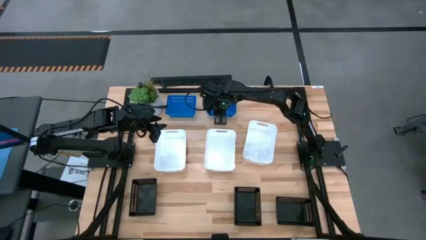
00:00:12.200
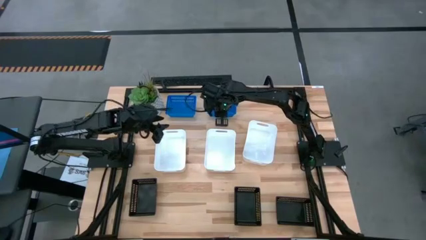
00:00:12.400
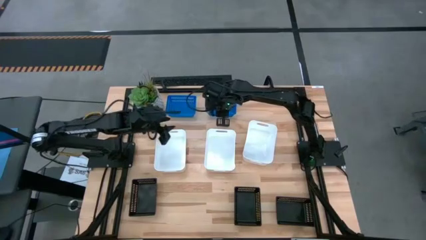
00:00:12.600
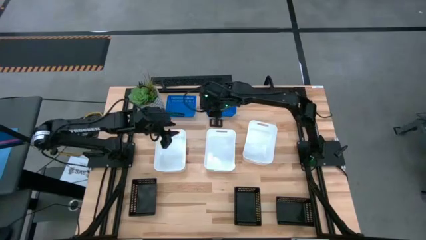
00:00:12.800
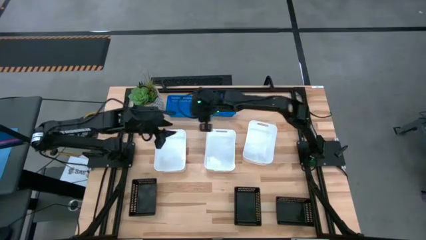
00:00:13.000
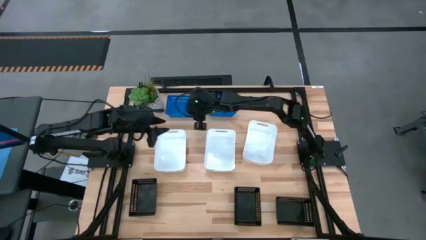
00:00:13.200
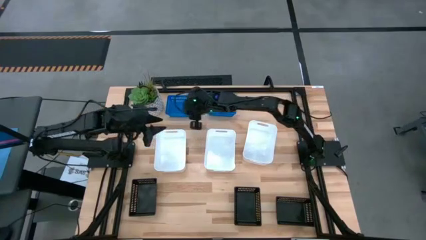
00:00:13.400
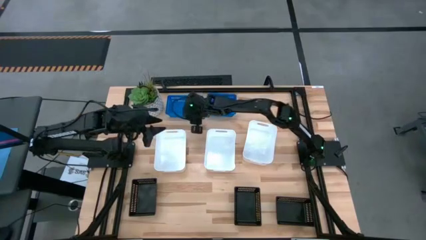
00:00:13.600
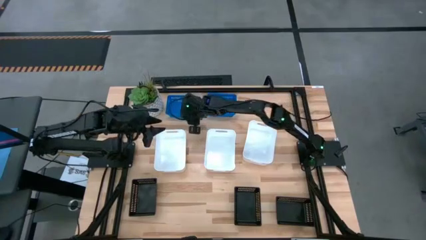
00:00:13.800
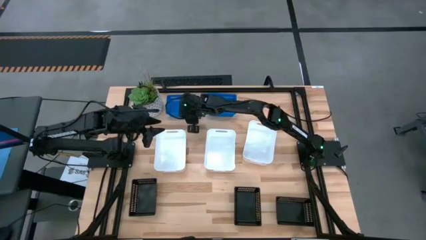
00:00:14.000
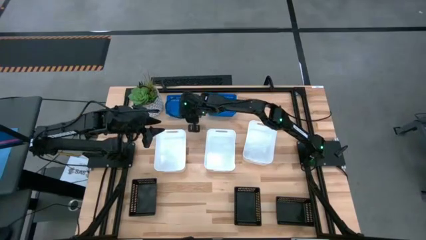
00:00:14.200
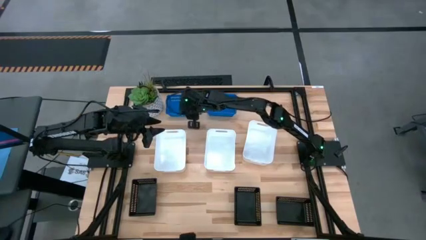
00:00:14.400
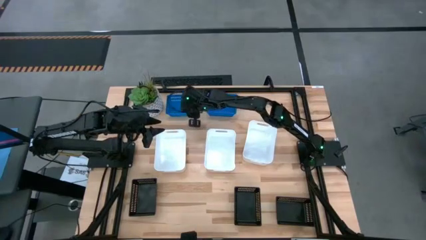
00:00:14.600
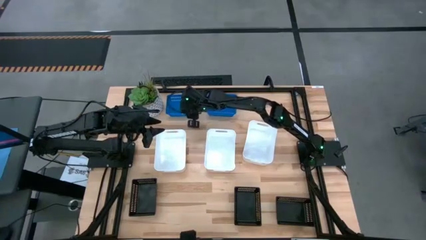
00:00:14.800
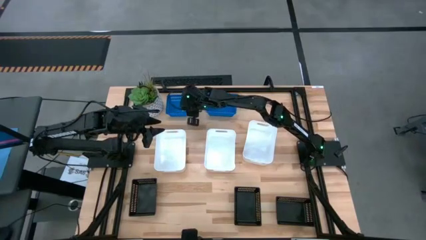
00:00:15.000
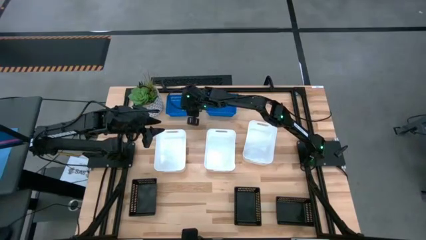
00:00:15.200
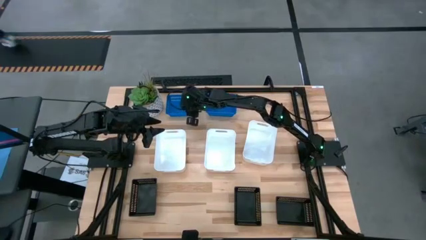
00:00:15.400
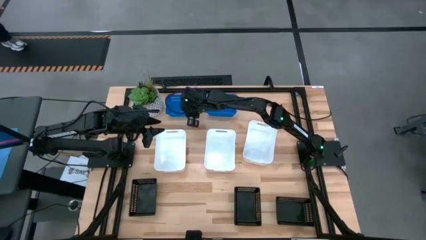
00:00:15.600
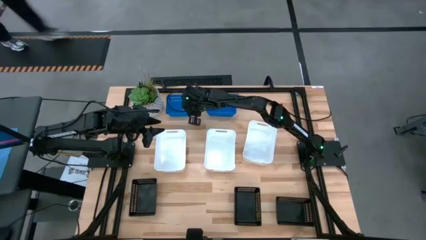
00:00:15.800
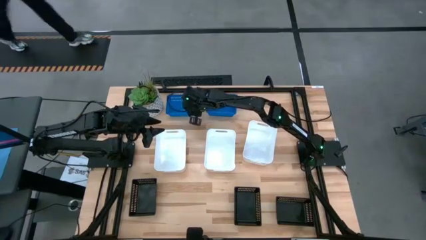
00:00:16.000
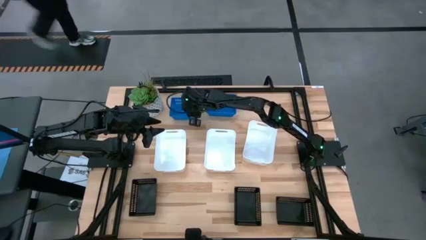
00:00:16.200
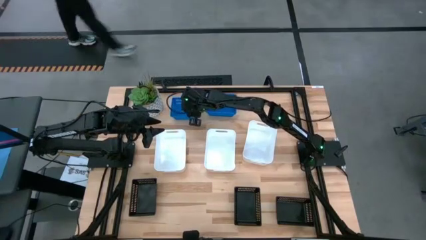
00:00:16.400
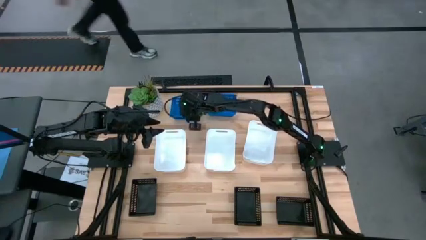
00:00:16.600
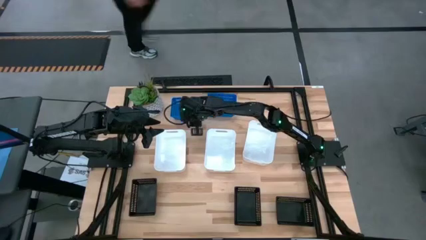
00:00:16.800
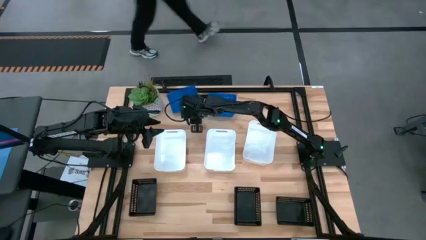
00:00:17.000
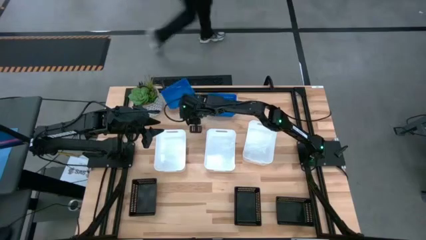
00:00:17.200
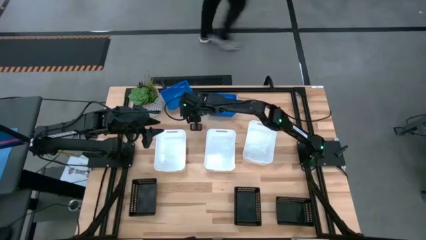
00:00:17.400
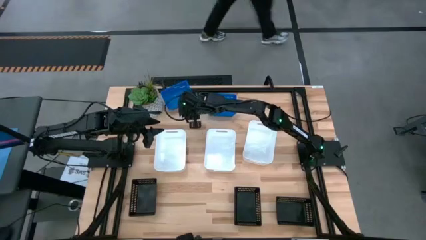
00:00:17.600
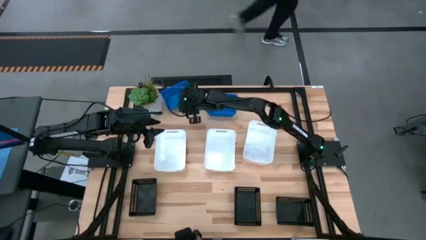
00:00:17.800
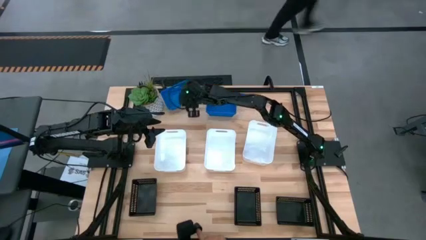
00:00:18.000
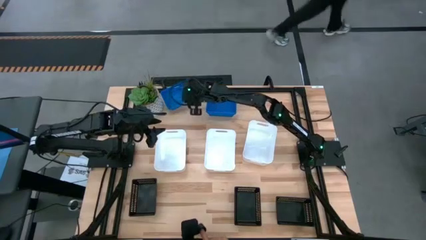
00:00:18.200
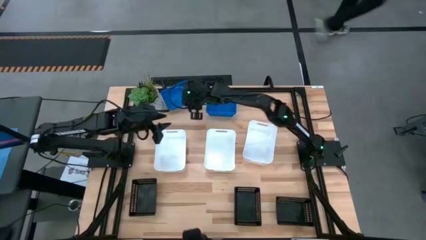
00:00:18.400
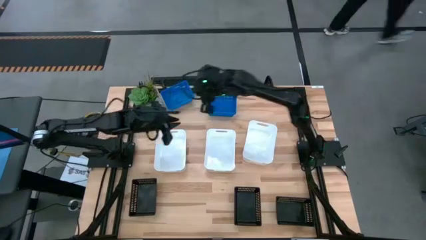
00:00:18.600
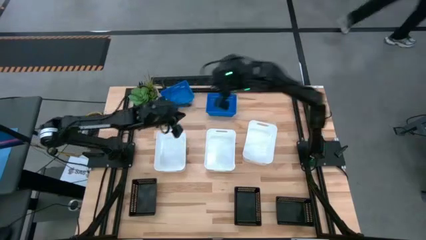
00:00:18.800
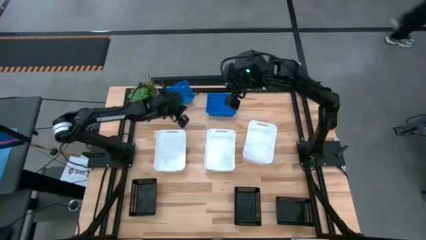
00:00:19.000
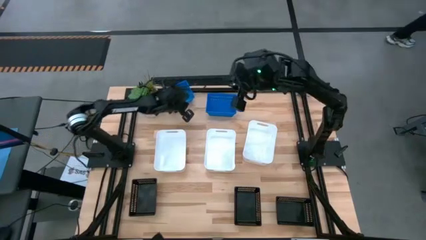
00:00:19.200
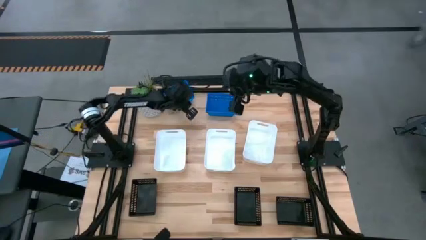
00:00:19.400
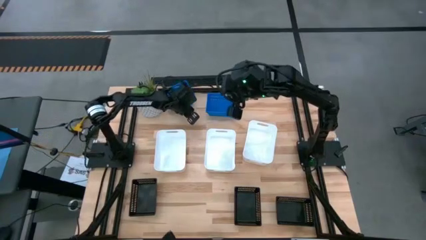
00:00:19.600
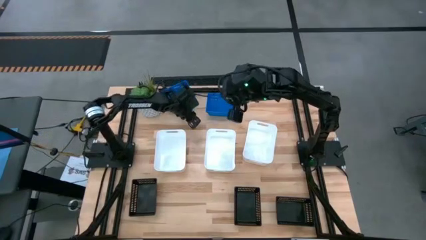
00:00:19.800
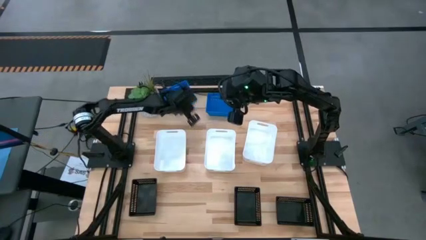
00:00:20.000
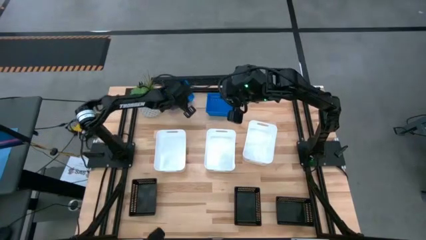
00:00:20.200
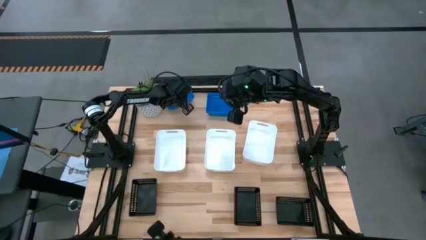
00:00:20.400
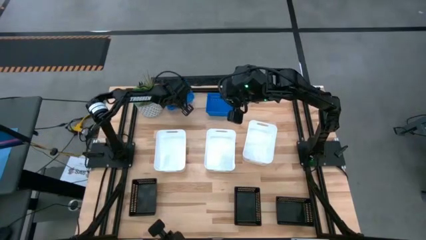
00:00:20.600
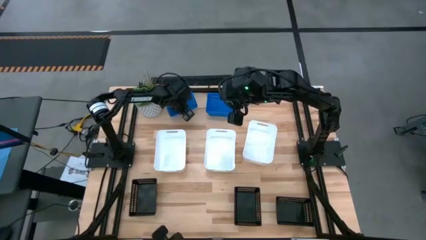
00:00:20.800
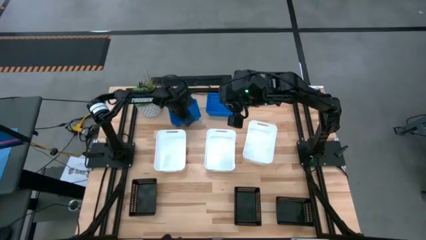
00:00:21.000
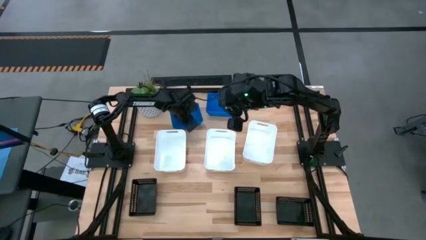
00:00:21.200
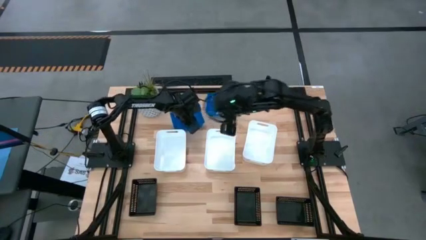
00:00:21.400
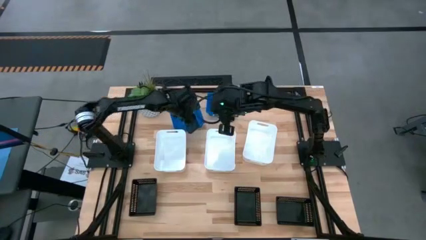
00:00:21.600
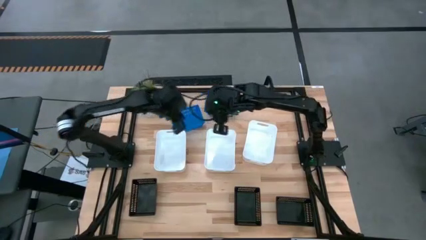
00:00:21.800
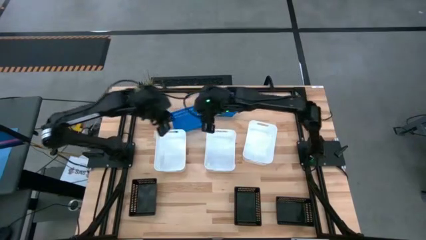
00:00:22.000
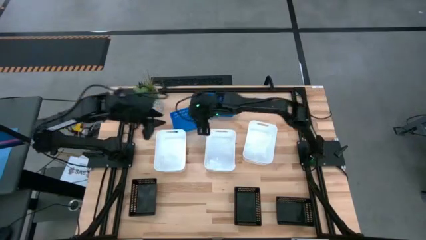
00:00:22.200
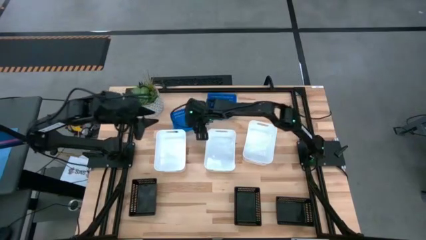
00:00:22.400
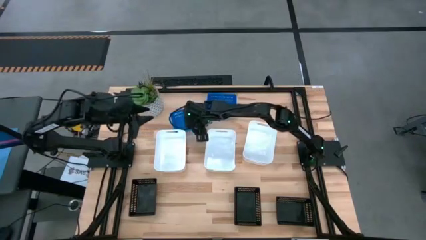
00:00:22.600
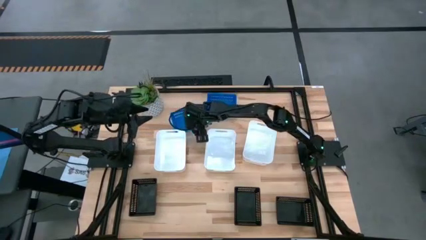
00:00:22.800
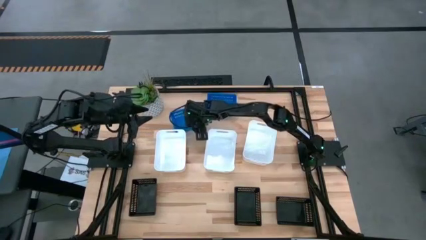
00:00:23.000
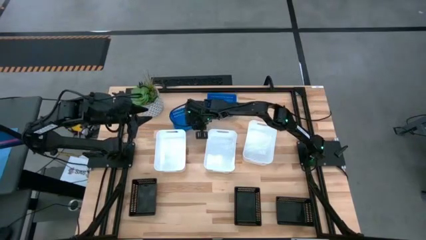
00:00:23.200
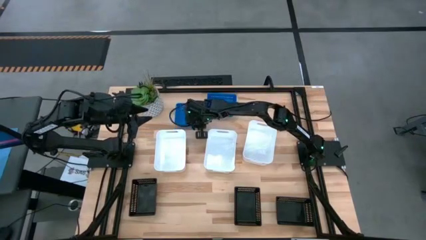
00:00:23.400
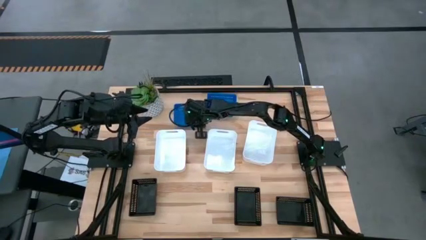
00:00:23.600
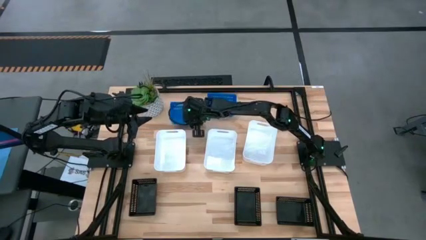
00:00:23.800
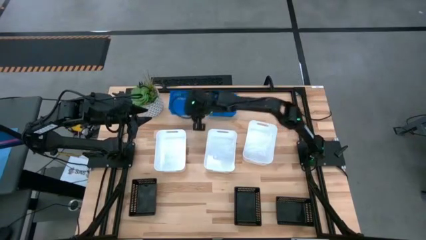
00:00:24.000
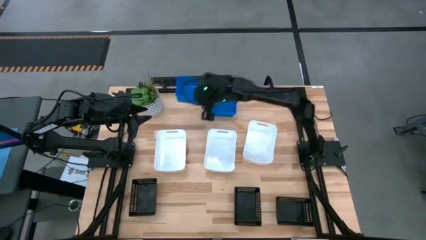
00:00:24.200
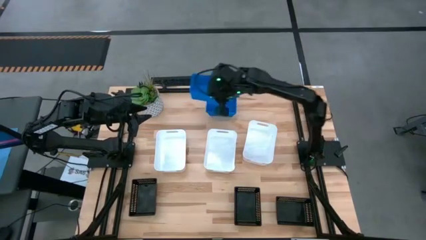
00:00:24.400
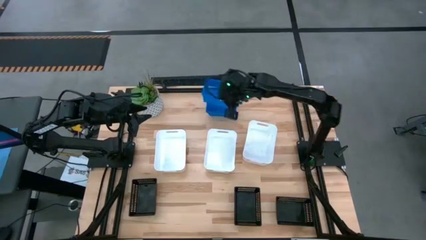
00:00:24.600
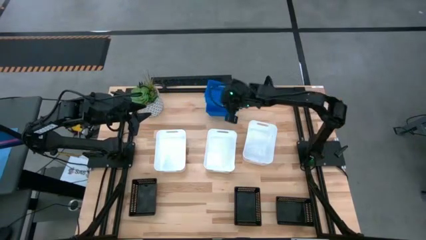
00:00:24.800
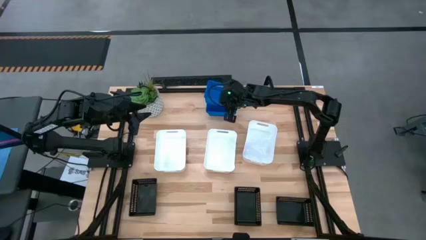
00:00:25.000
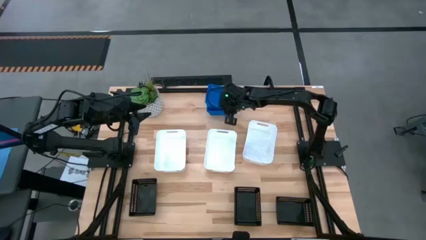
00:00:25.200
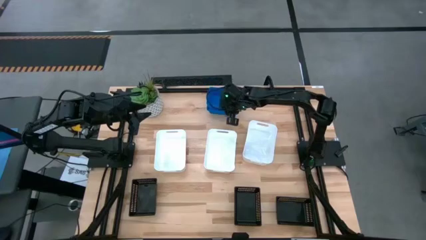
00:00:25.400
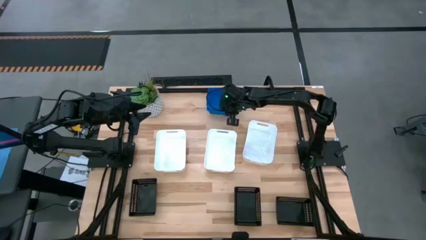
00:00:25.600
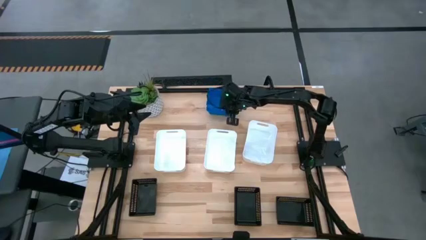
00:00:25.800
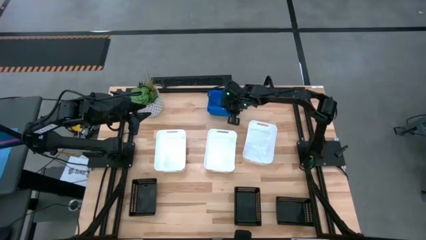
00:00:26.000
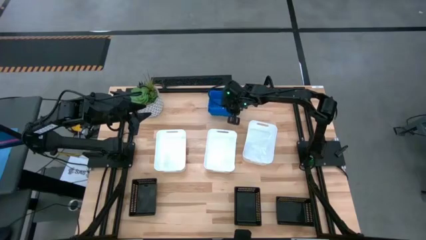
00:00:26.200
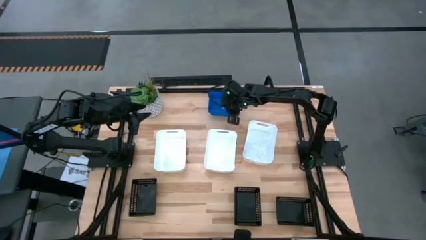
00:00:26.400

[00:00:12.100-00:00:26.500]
Stack the left blue bin on the blue bins

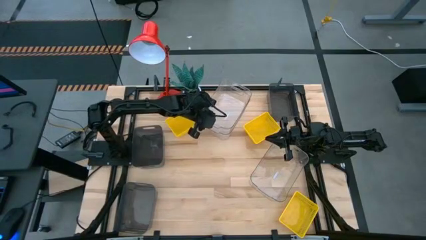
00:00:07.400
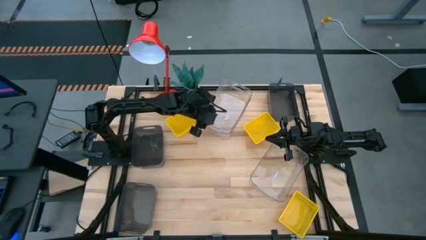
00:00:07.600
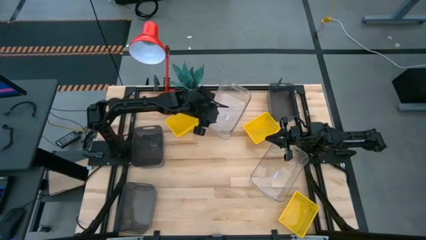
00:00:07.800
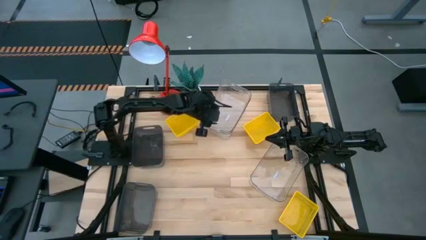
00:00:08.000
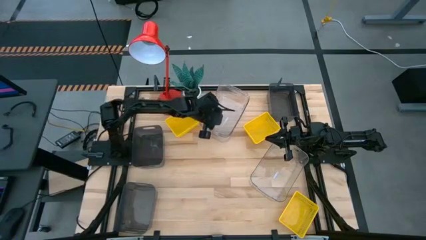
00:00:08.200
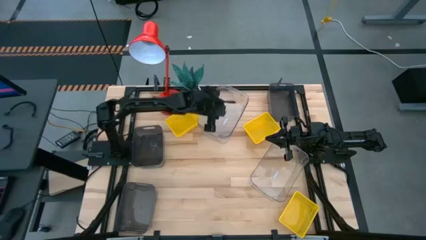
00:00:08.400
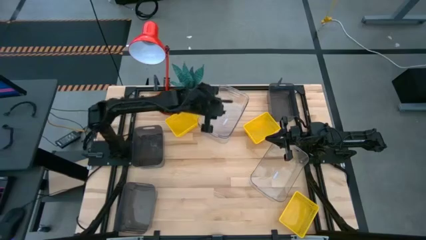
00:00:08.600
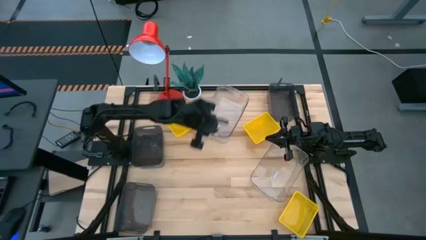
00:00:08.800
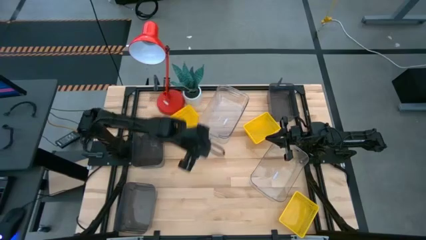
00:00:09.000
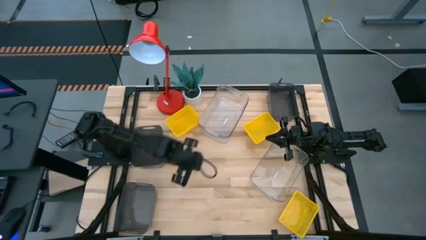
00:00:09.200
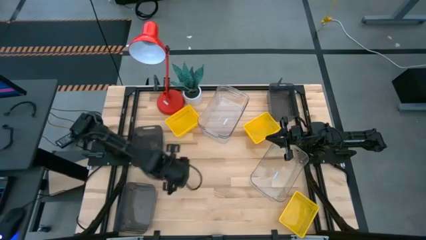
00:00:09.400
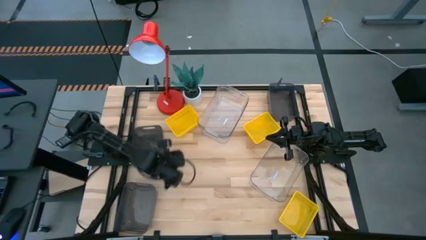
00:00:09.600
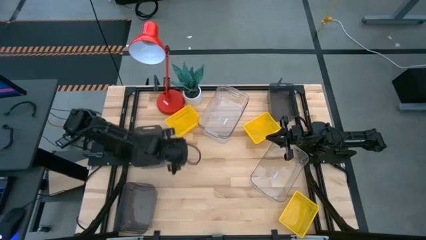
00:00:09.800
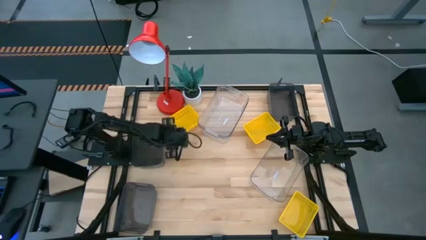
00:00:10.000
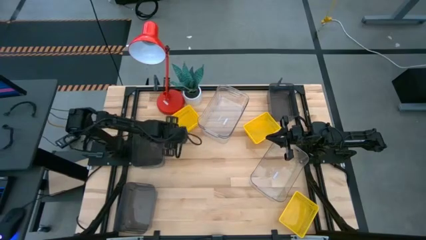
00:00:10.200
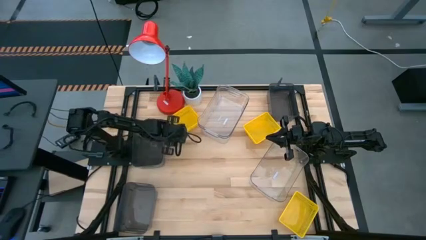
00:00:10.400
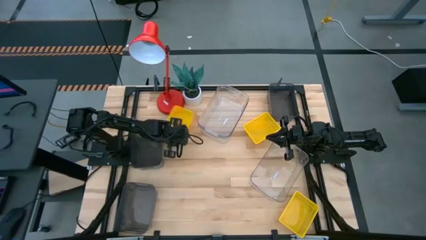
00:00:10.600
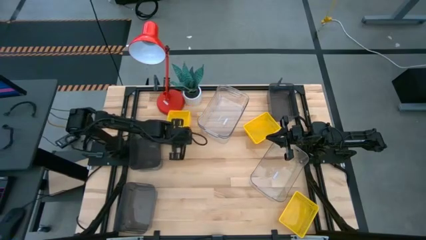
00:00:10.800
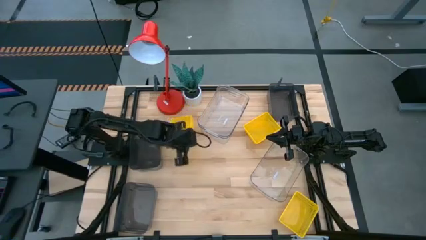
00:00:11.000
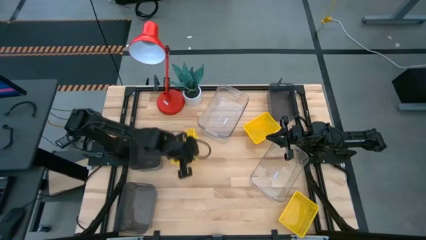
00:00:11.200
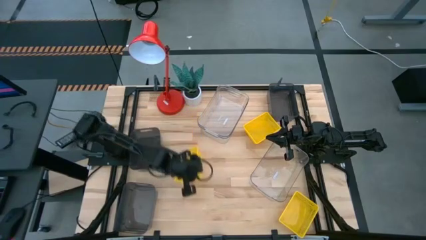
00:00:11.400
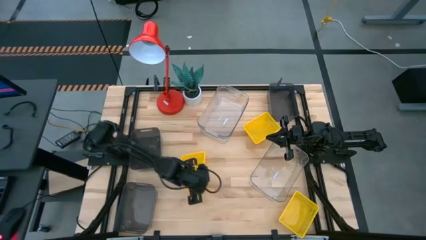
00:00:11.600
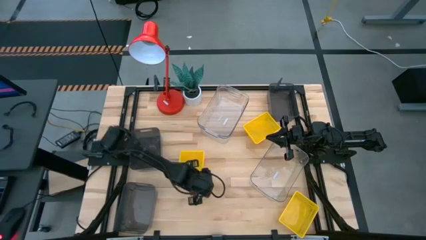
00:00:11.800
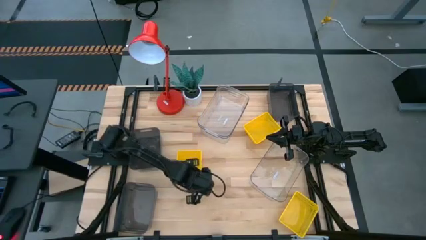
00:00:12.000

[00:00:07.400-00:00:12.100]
Move the top left yellow bin to the middle left of the table
